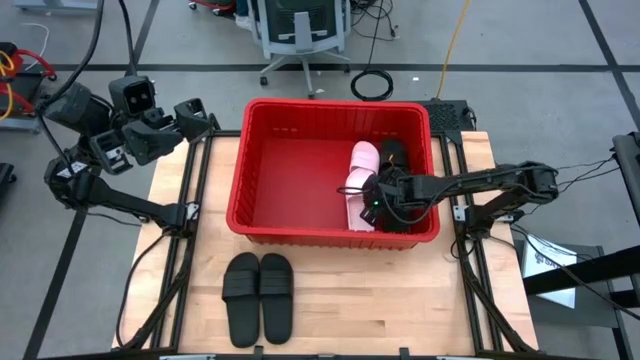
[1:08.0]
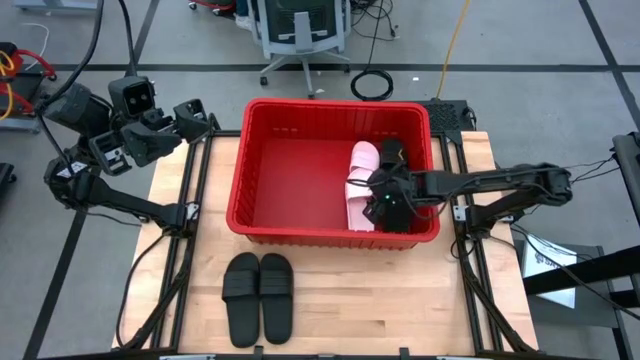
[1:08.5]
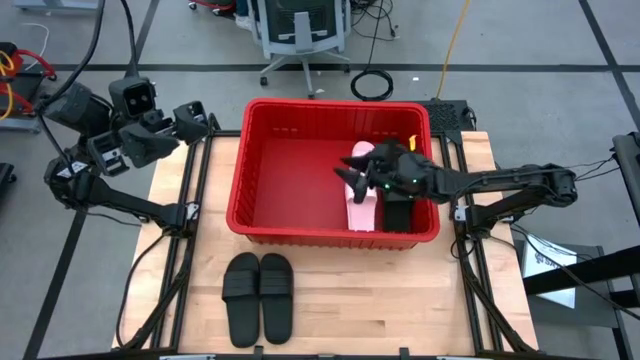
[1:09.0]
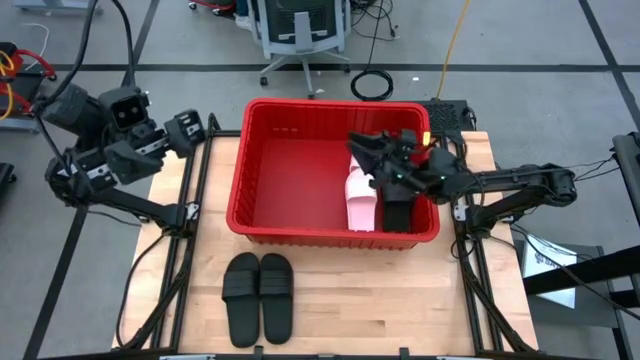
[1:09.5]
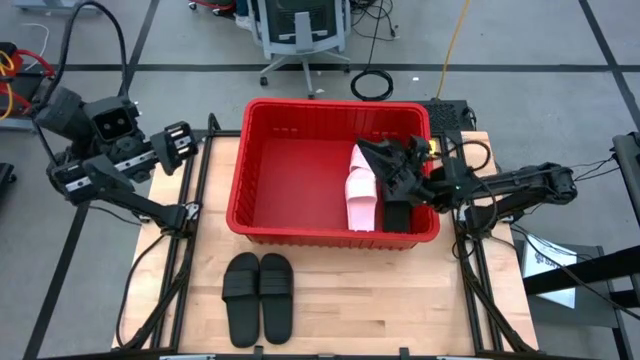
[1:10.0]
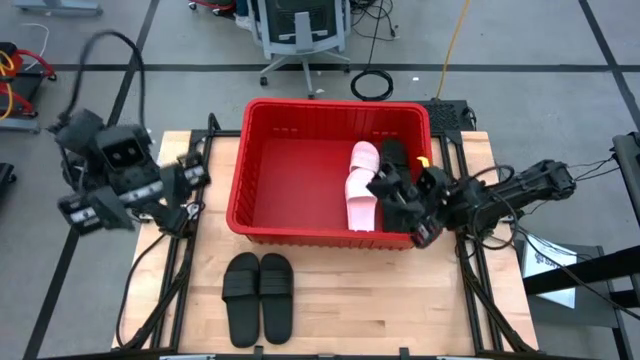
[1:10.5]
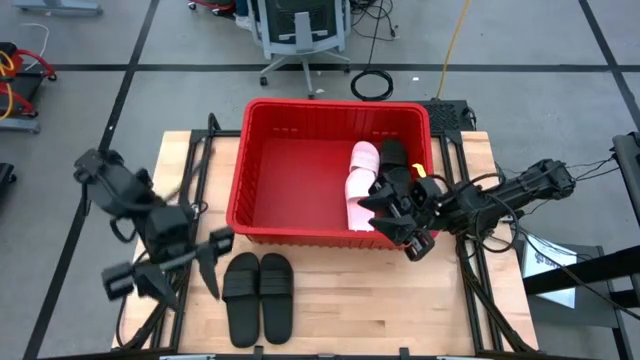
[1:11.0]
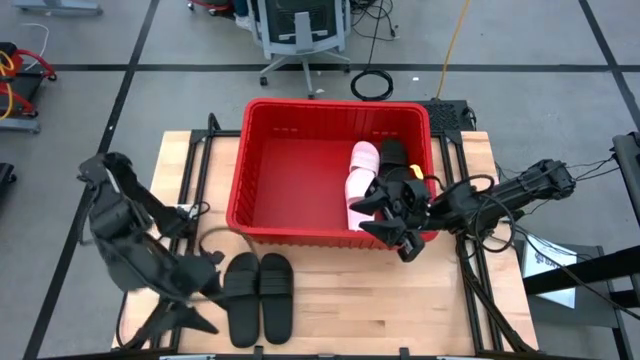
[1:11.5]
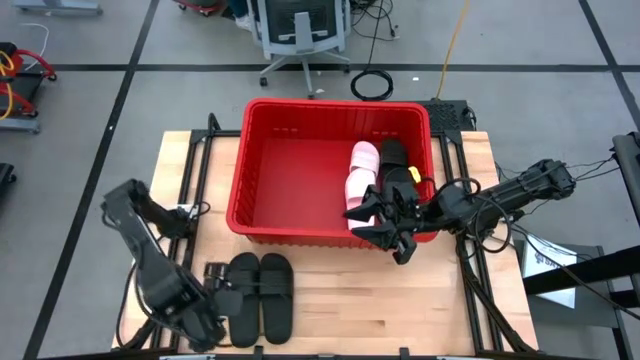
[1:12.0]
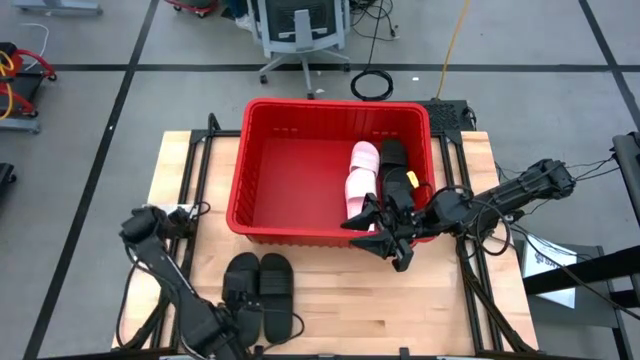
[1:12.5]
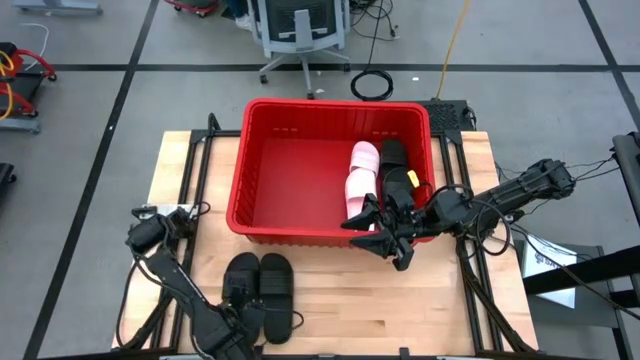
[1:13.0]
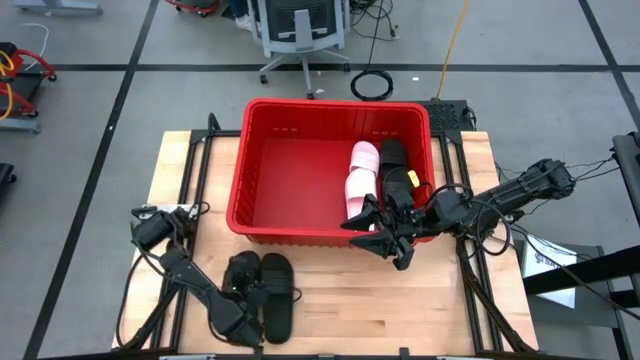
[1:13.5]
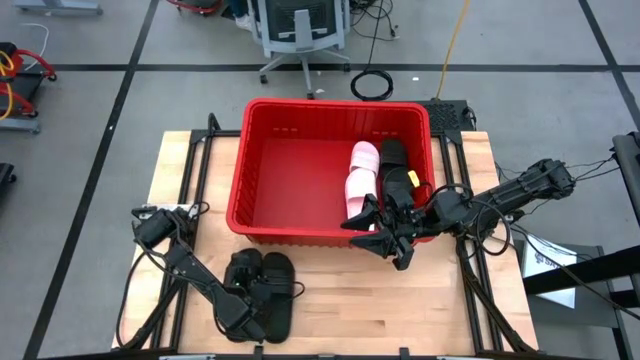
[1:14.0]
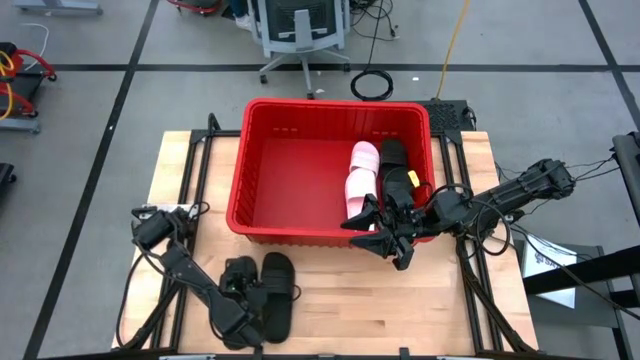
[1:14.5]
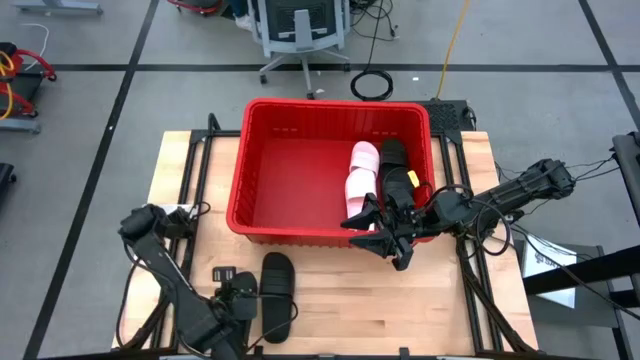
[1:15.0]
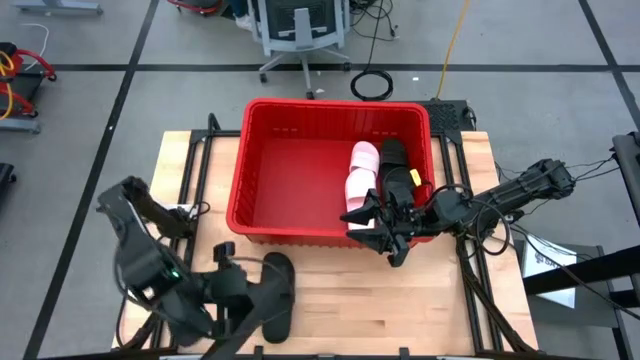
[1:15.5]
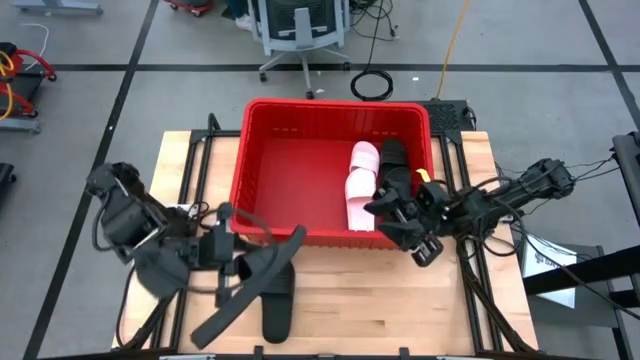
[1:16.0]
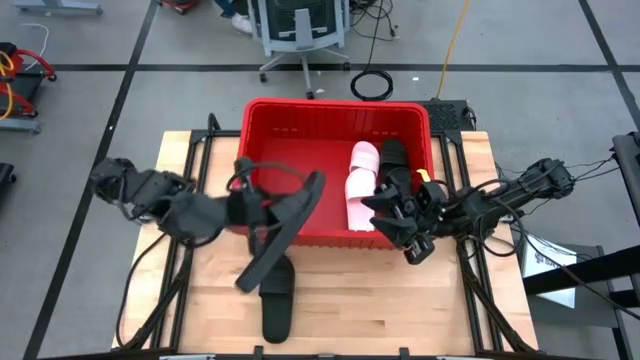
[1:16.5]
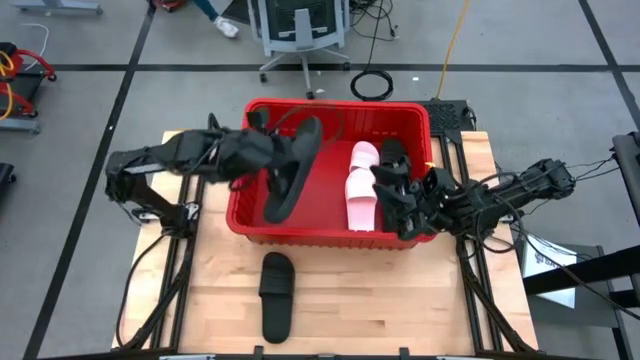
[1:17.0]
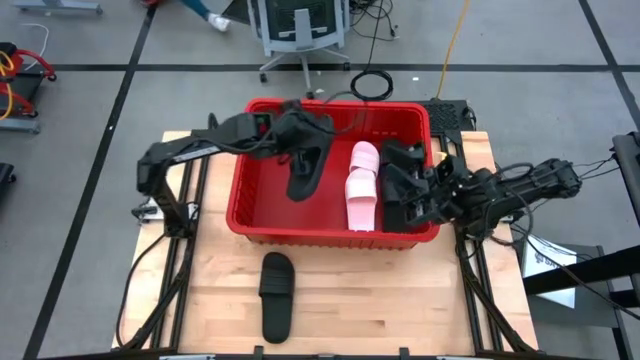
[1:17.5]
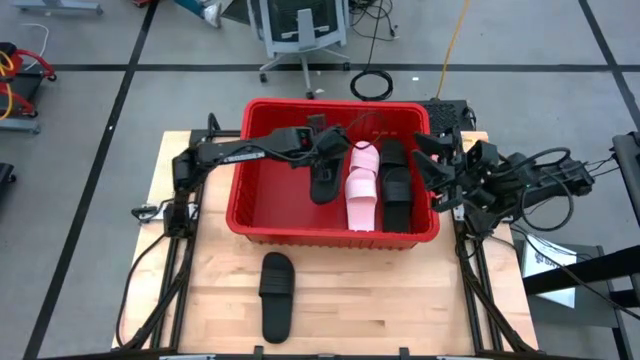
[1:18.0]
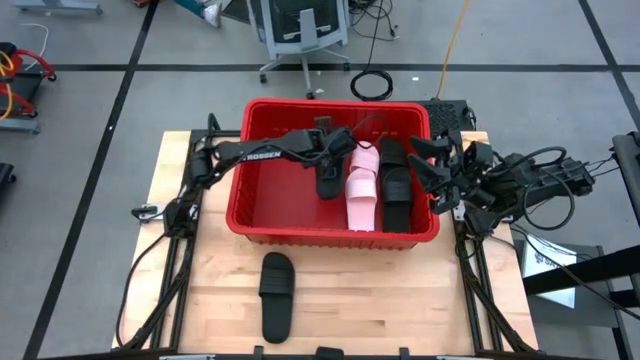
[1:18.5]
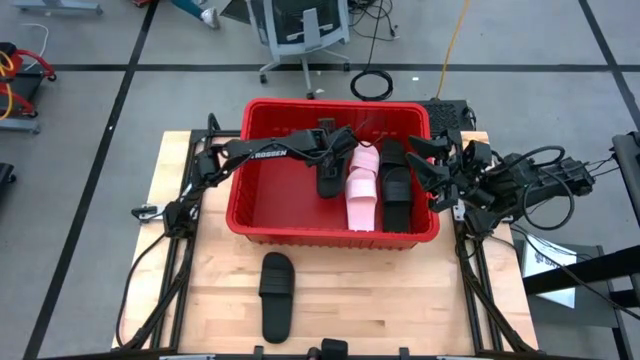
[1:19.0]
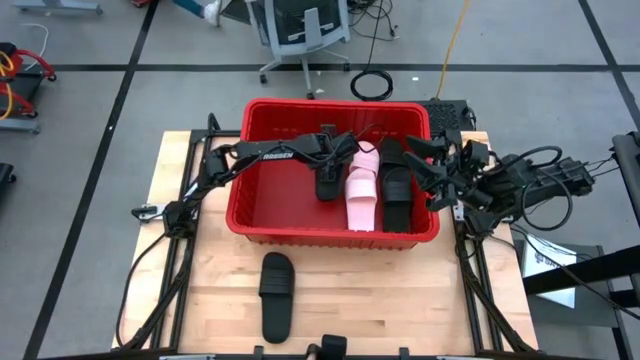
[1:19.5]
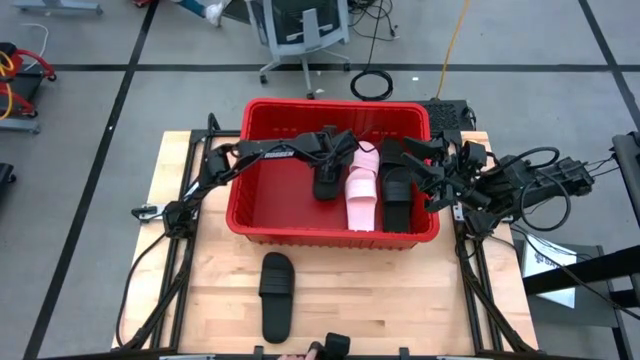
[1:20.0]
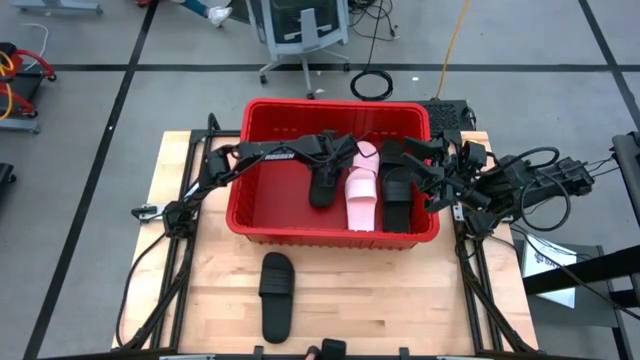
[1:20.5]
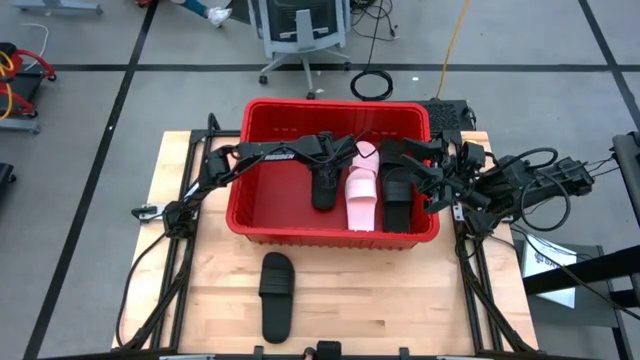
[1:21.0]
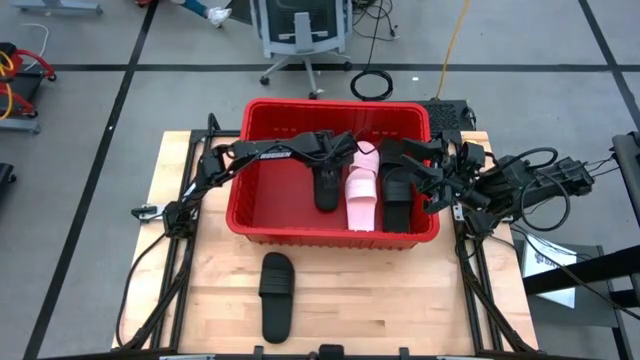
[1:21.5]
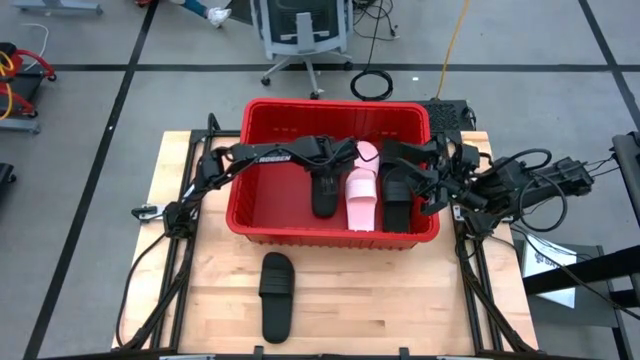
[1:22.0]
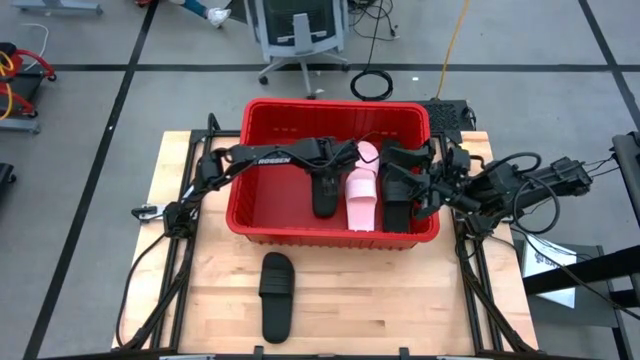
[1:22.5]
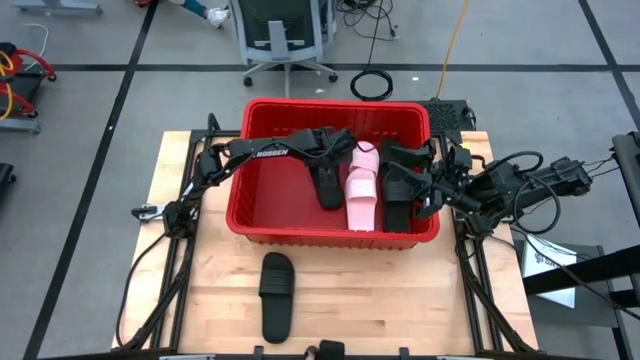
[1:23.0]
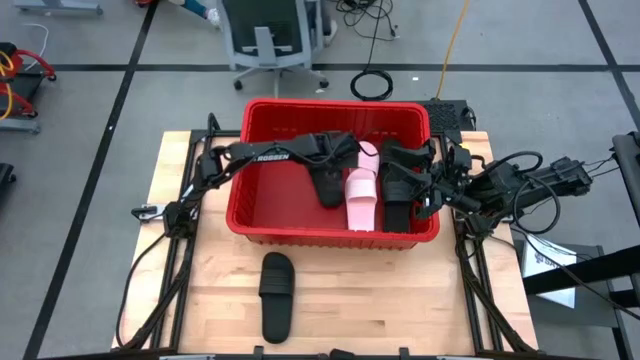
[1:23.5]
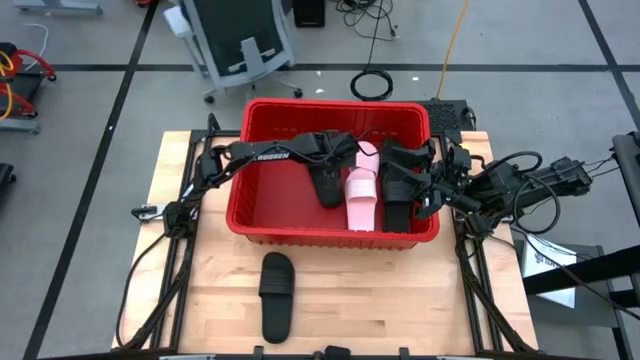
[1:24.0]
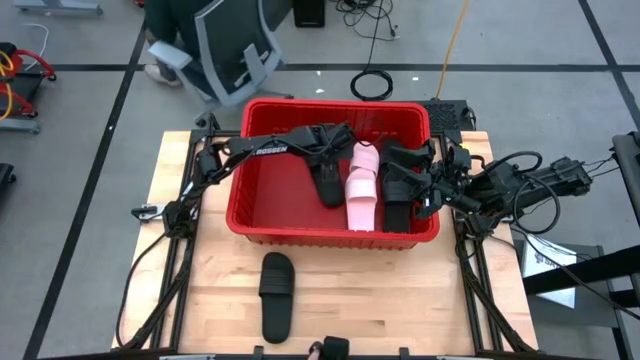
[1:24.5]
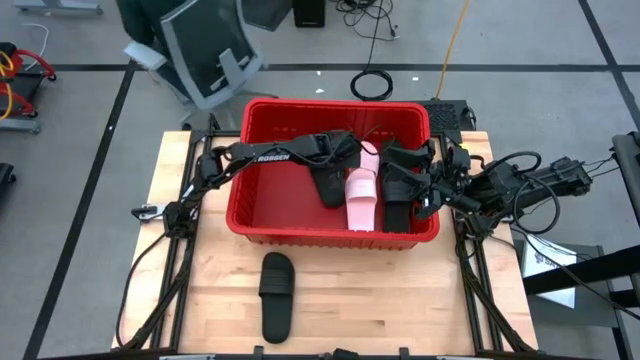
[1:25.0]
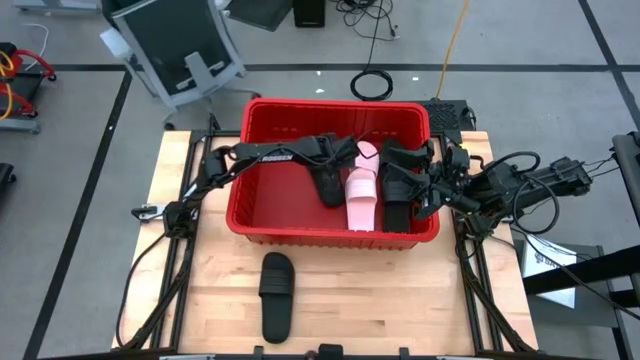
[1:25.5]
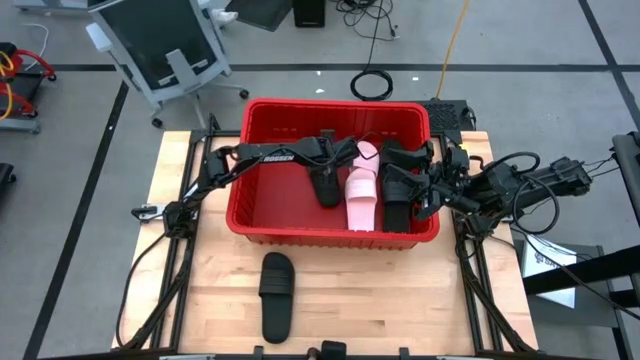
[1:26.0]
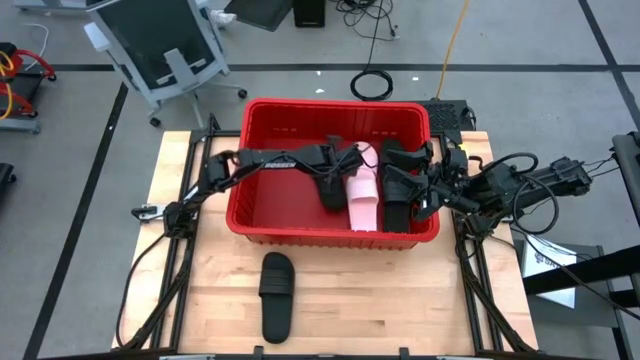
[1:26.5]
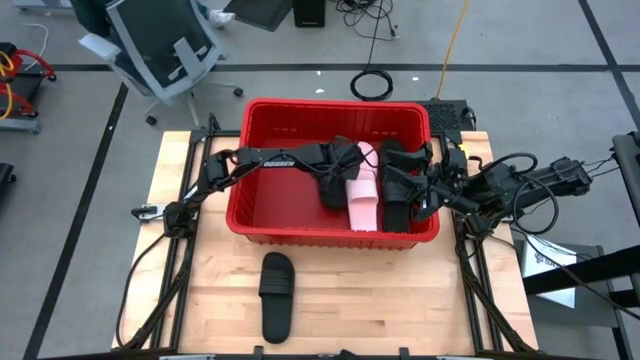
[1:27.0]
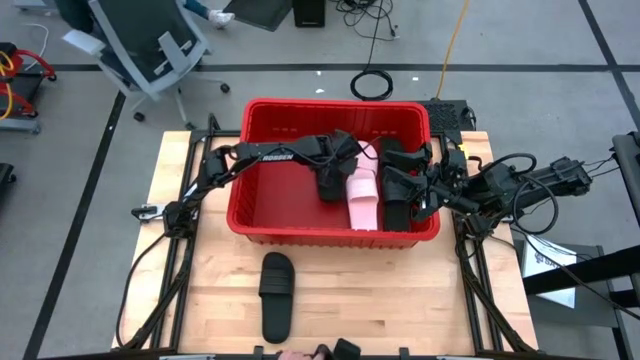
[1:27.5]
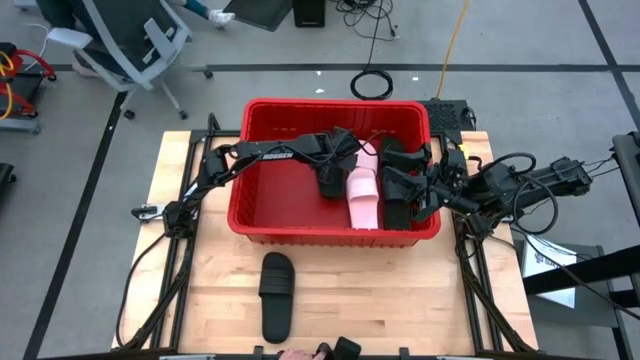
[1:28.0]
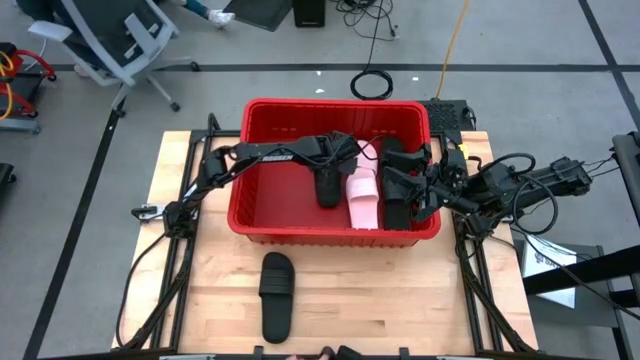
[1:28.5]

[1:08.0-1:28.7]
Task: Pick and place slides into bin
Put the black slide into the red bin

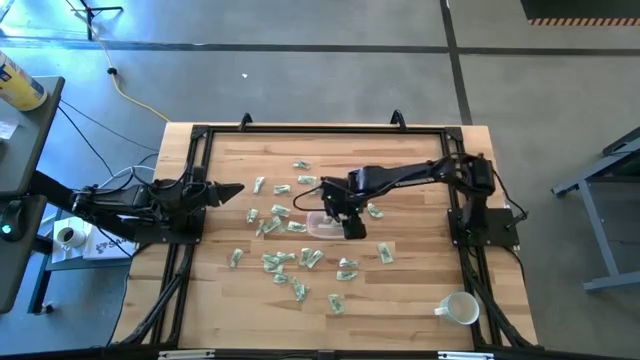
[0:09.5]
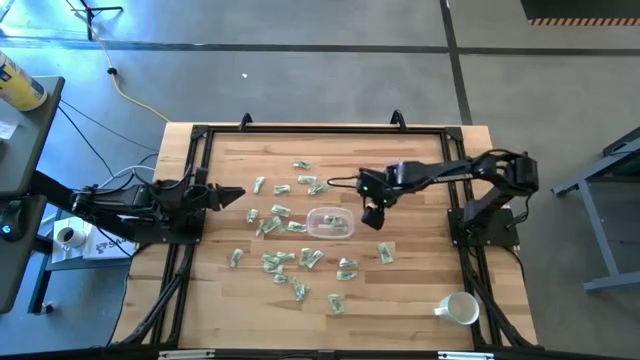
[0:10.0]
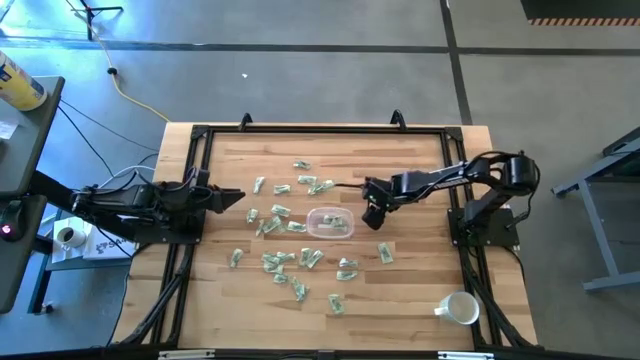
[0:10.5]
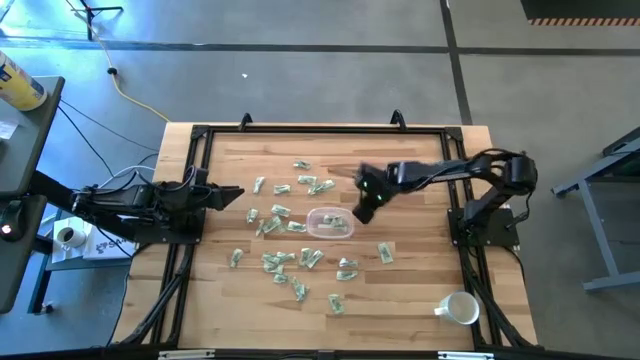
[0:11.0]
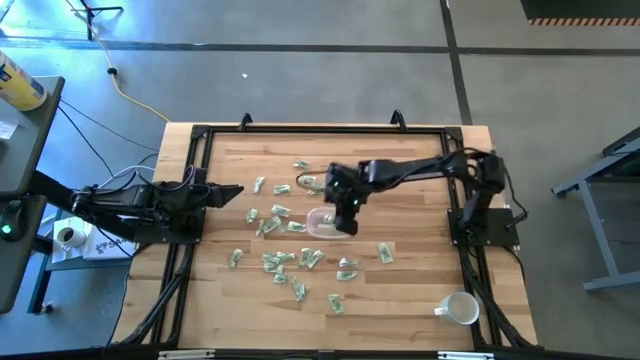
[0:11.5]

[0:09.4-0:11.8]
Task: Pick and place Stevia / Truvia into bins
Put the stevia packet into the transparent container
